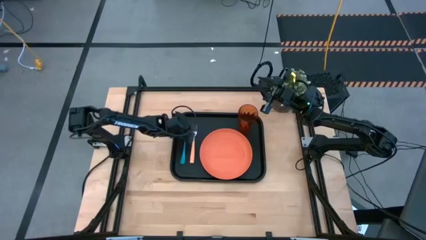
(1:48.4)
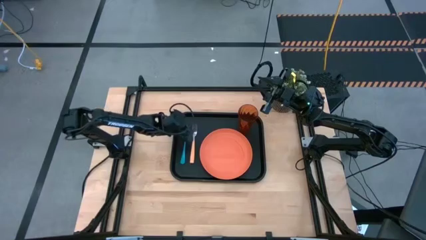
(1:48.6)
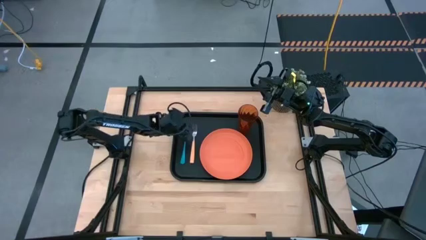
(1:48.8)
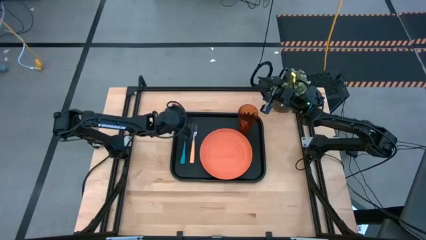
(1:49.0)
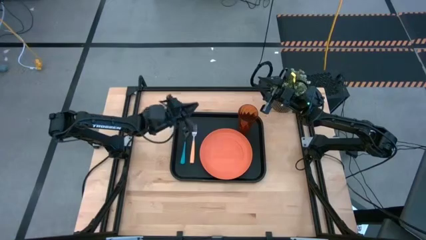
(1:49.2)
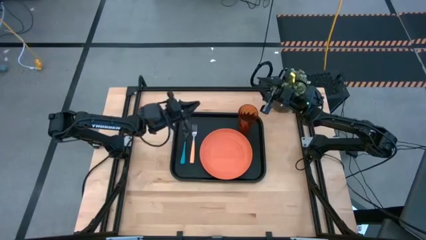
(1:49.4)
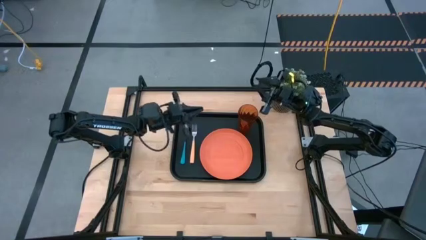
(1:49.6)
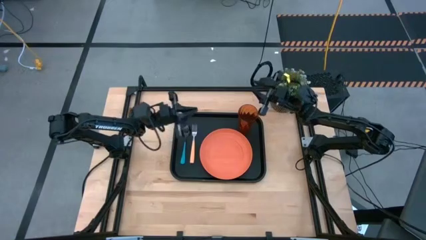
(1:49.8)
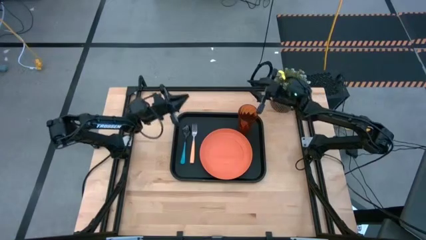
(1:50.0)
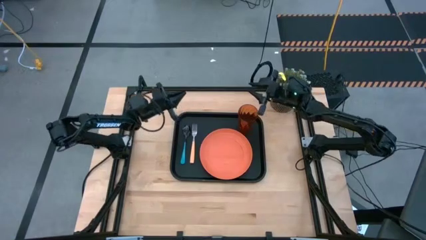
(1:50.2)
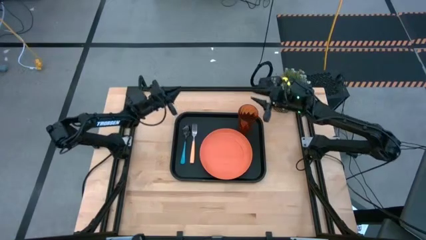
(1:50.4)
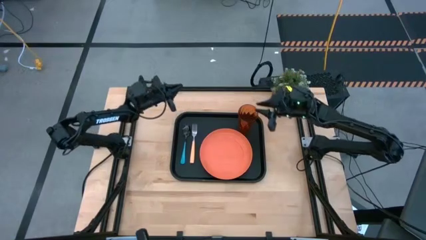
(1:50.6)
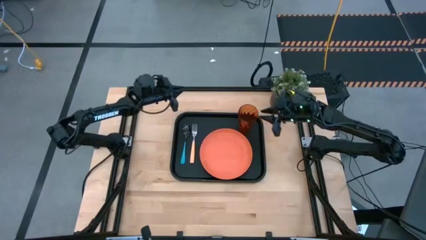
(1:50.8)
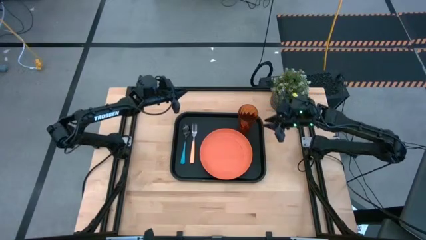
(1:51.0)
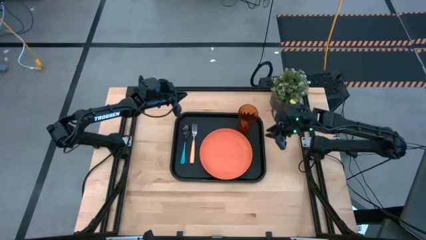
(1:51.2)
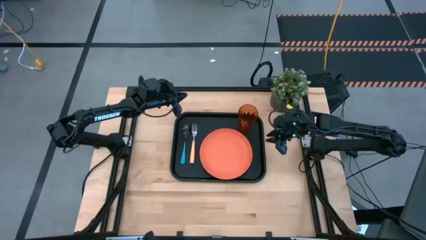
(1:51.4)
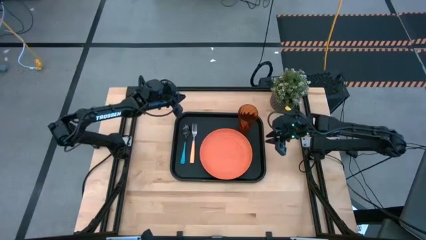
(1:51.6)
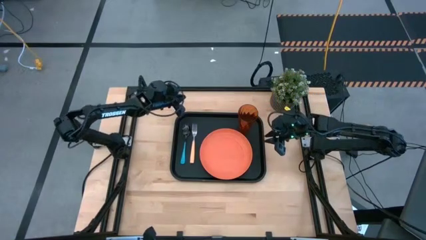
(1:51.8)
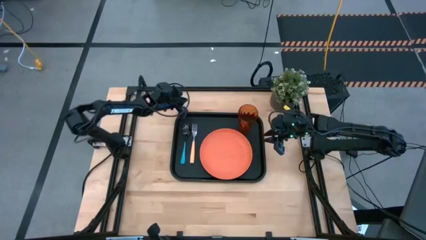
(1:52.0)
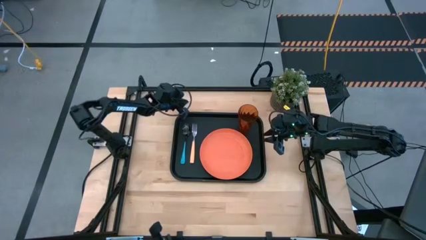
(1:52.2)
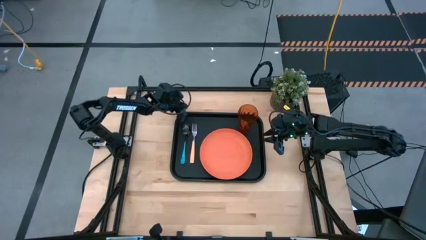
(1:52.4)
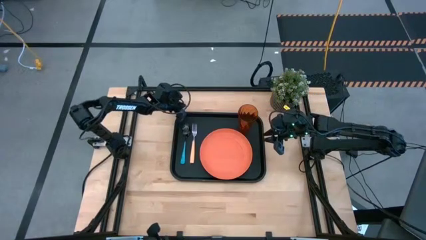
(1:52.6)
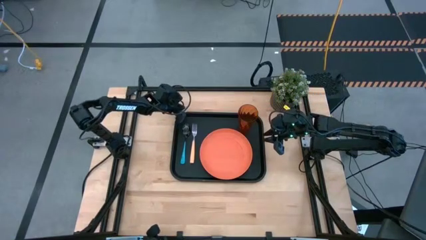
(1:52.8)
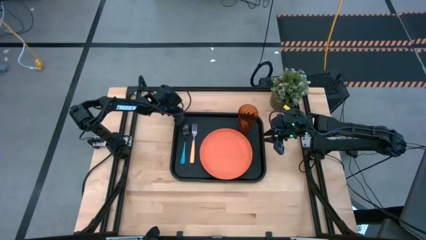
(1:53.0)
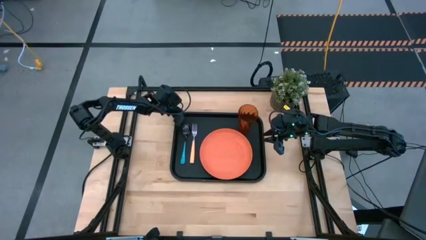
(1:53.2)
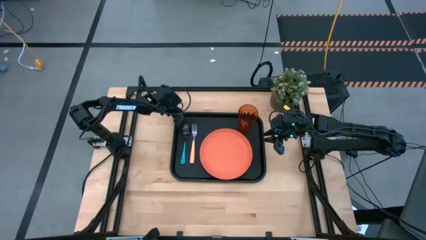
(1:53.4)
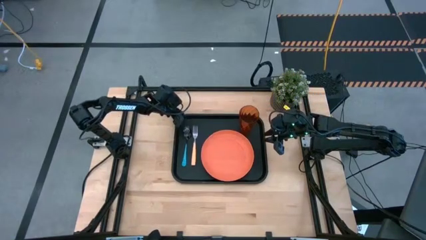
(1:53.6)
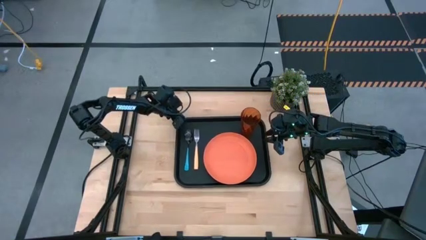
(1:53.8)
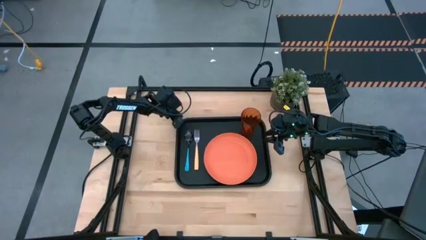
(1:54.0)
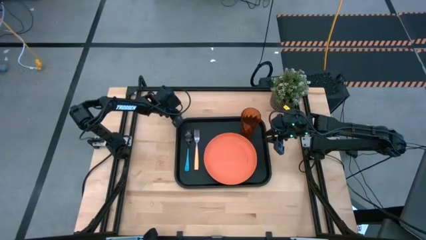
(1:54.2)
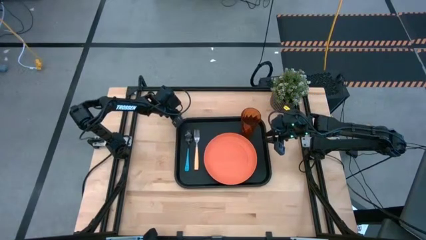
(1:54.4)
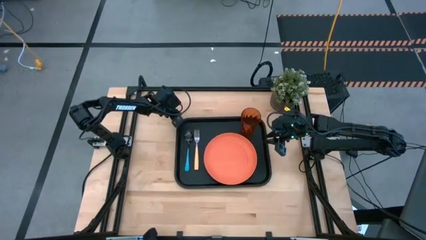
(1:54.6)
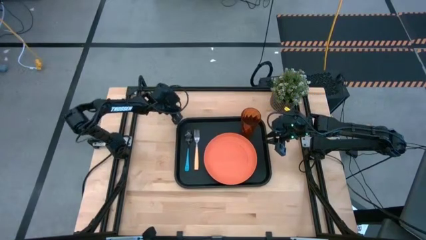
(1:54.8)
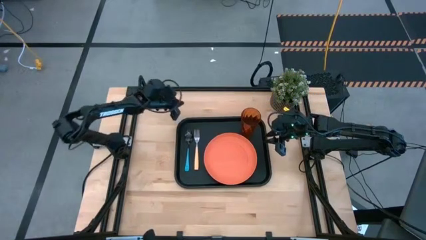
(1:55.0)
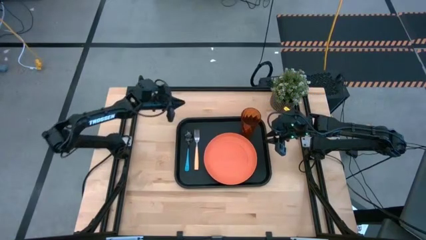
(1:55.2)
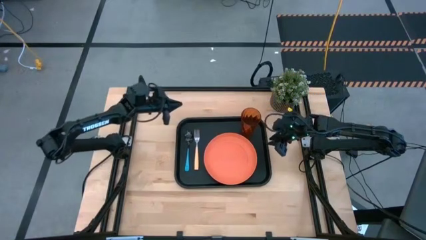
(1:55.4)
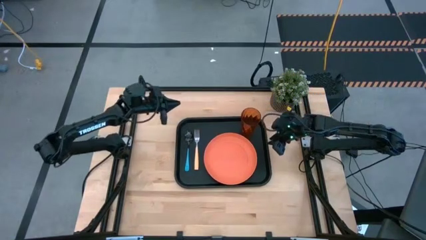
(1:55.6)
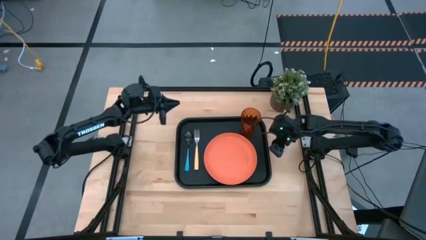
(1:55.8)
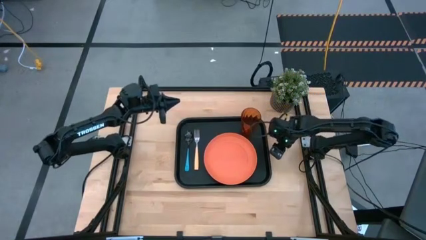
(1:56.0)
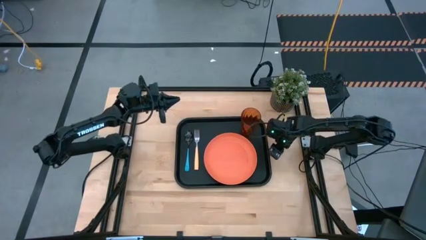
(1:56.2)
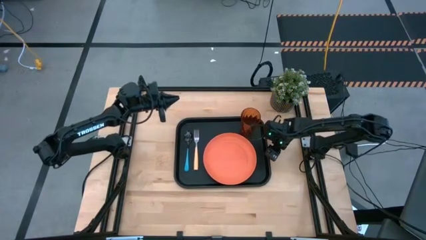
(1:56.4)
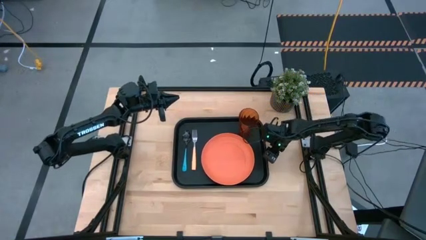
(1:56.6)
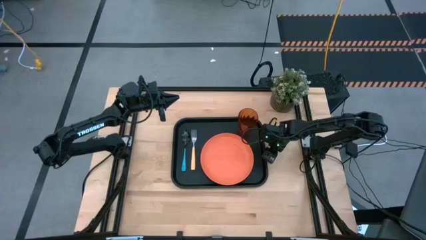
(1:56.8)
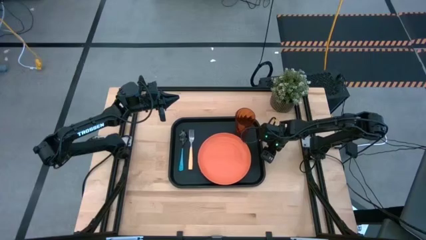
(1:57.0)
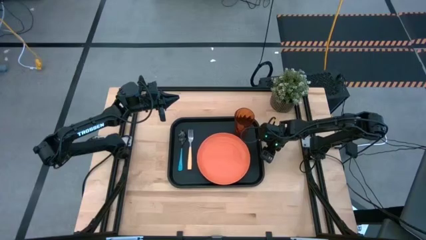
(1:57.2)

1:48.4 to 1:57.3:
Task: Pick and place plate/cup/fork/spoon on tray
Adjust the black serving tray

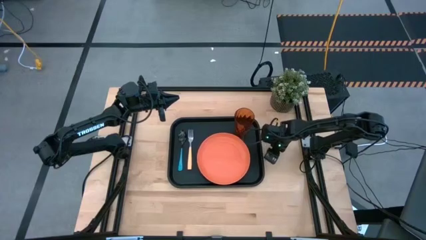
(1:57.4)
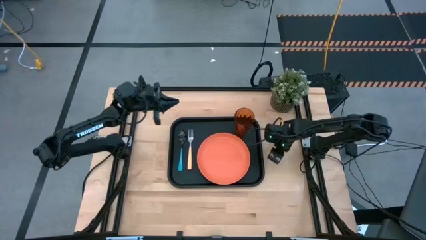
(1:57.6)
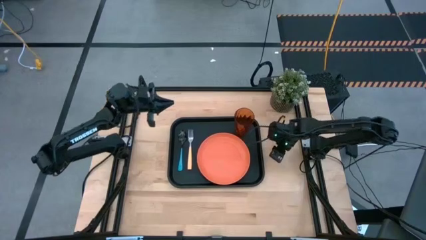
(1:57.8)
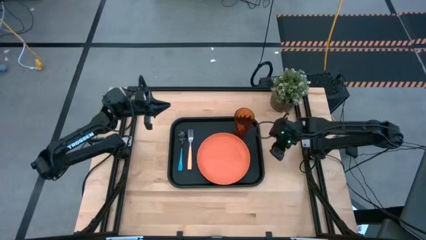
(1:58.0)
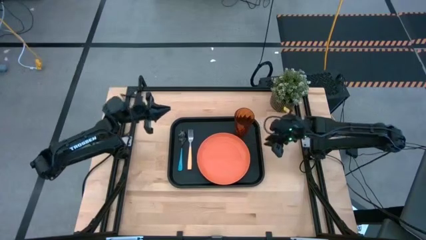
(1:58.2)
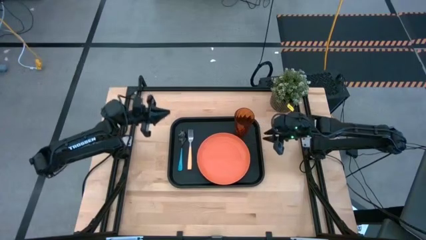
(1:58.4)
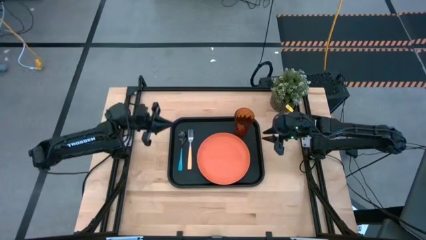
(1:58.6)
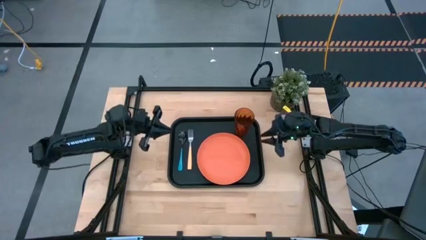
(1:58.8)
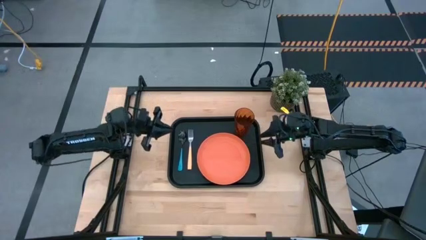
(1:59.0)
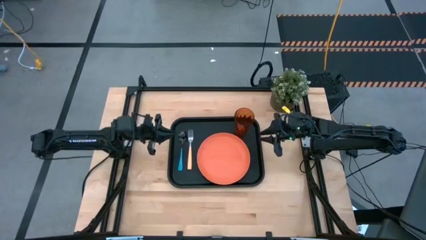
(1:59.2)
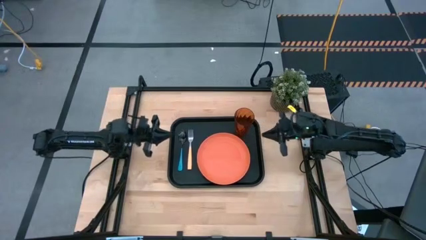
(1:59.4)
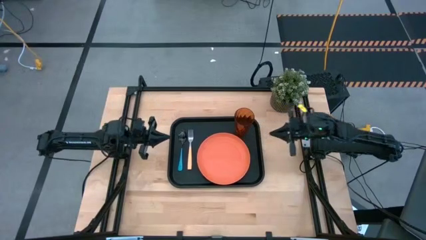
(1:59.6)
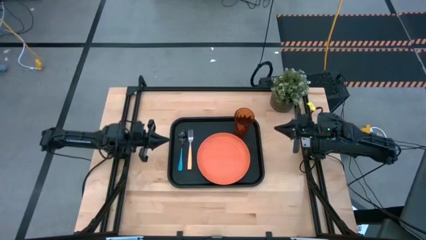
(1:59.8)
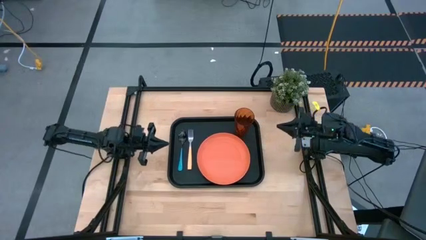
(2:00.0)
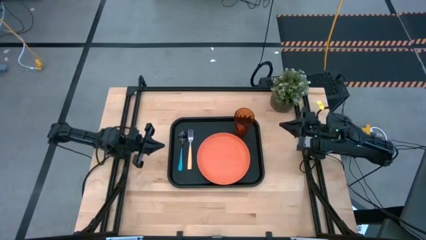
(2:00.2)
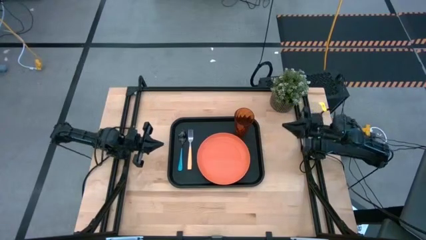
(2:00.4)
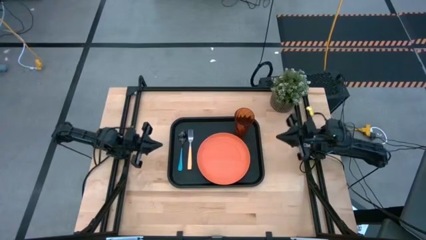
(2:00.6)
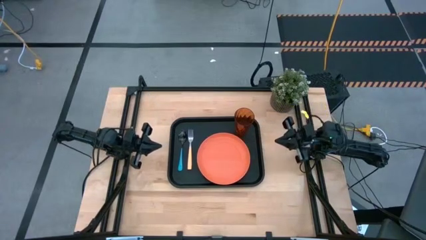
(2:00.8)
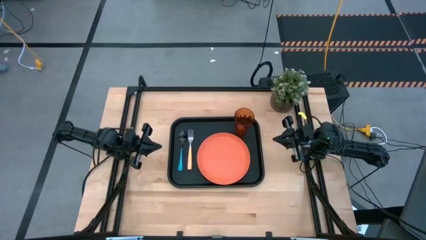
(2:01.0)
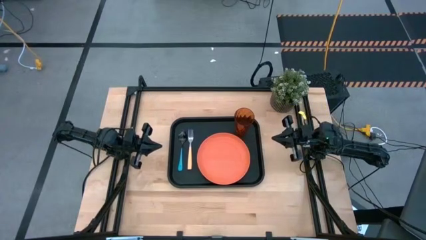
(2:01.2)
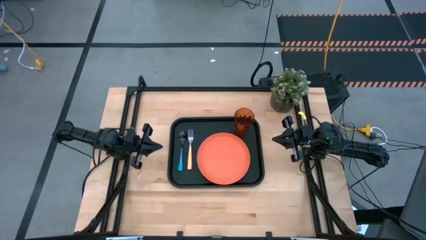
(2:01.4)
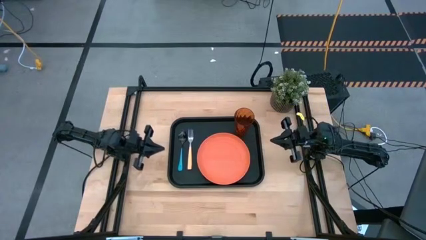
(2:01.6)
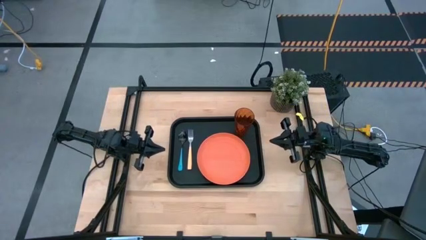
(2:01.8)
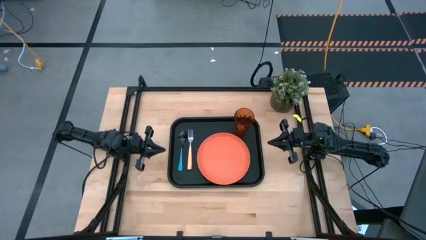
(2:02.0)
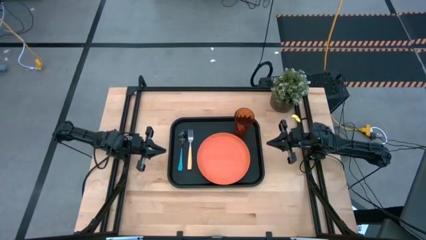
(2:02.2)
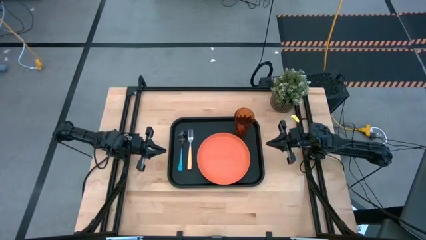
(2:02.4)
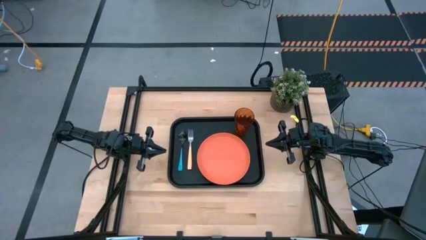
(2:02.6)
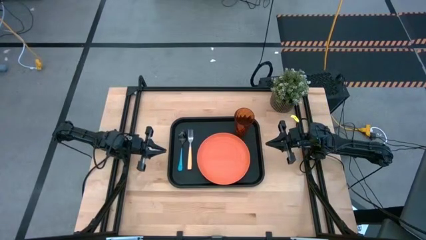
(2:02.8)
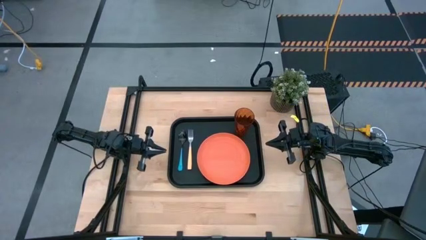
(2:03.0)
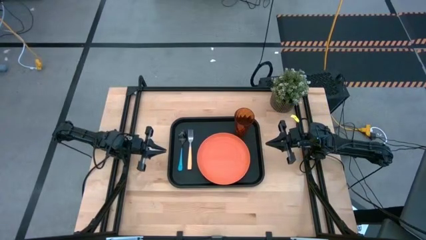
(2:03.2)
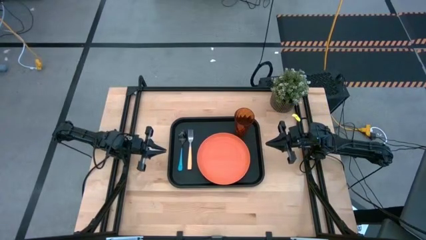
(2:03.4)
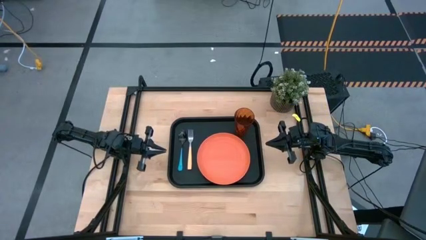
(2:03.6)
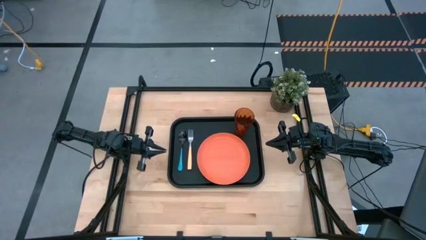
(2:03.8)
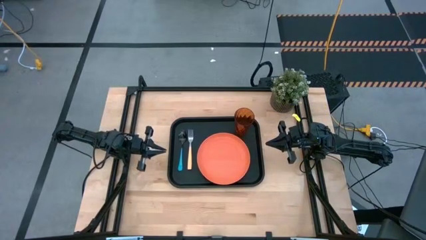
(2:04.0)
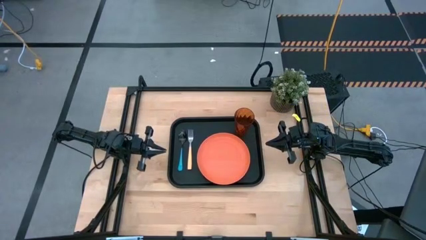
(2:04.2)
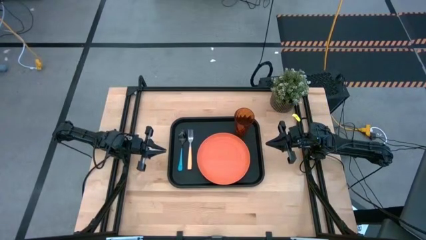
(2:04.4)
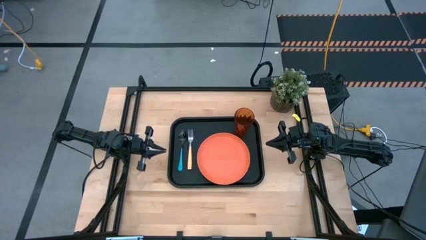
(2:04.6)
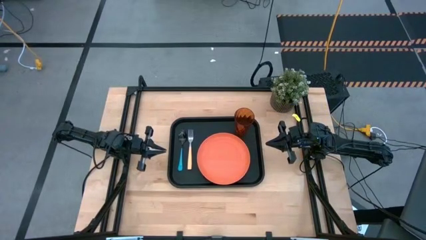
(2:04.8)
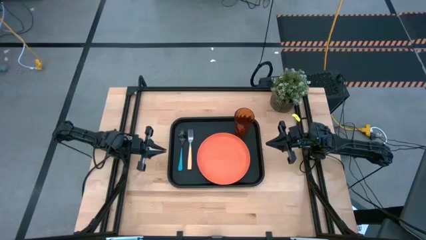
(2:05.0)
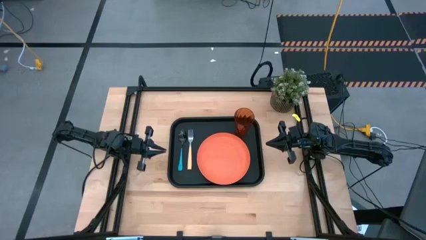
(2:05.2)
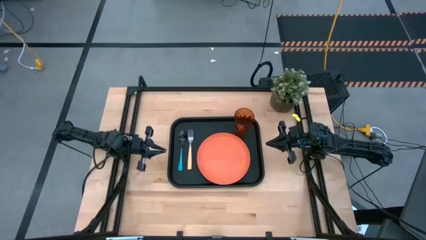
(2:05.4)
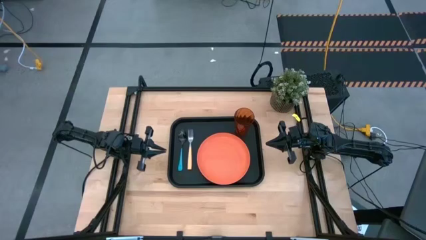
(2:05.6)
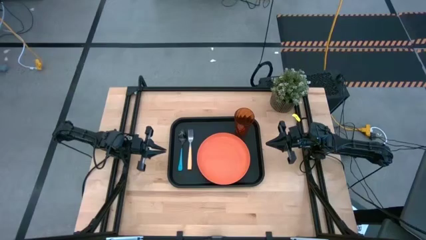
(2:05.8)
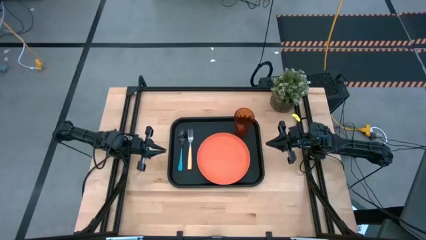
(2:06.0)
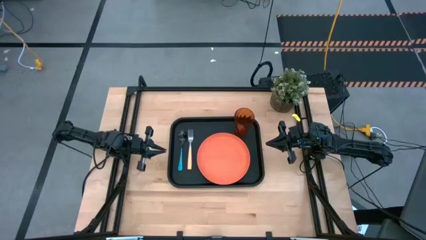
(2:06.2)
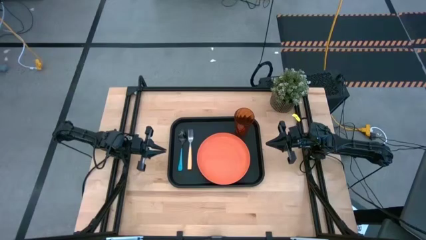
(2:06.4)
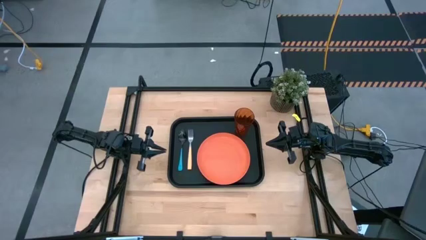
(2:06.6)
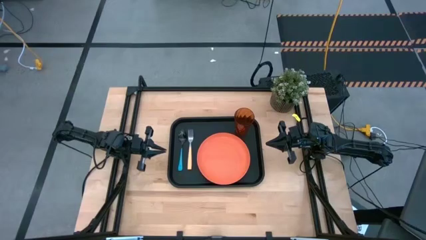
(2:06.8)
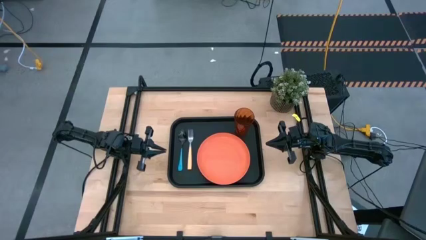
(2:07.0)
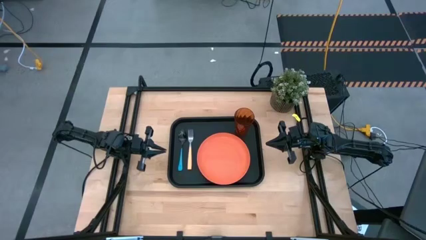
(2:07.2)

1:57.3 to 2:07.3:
Return to Home Position
